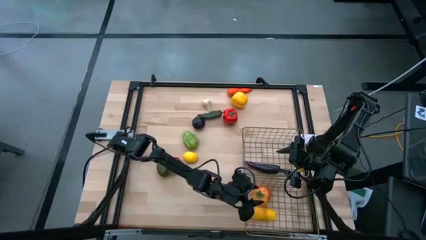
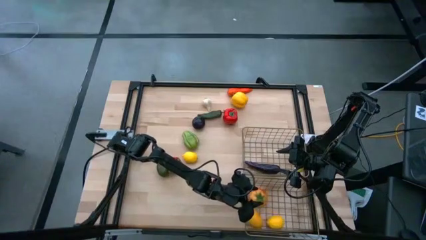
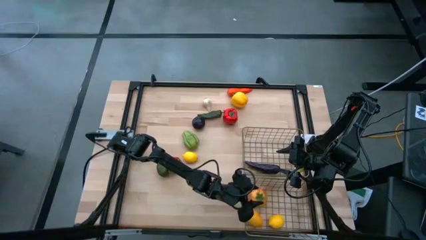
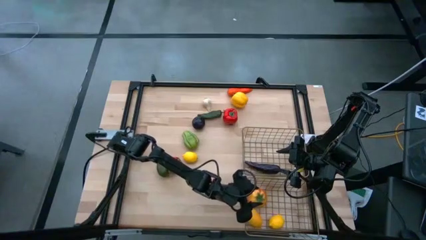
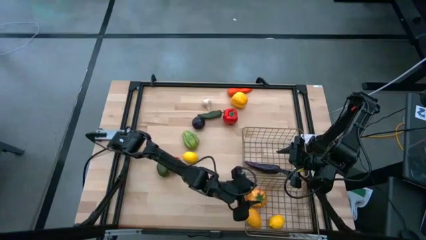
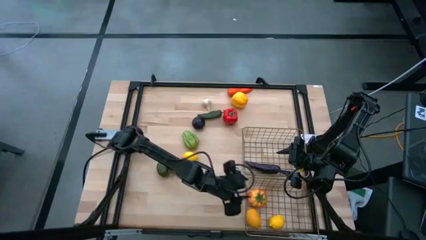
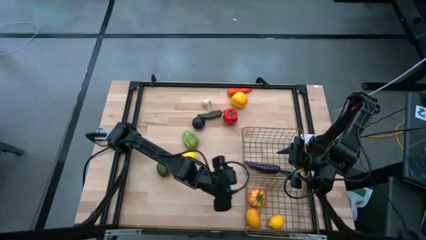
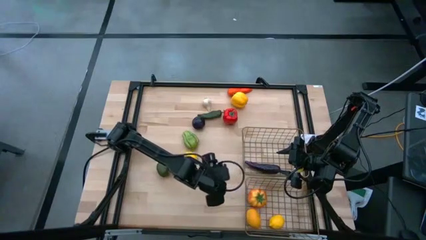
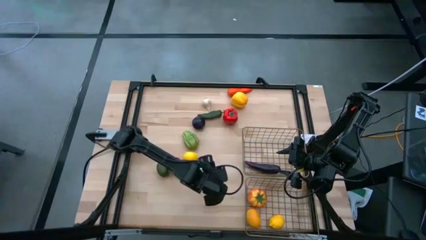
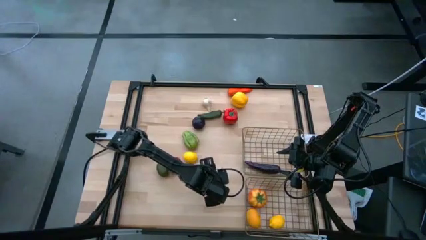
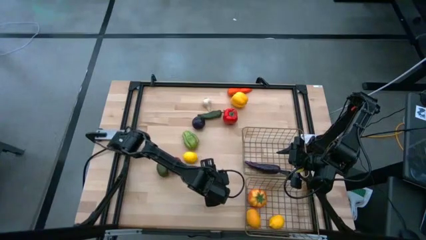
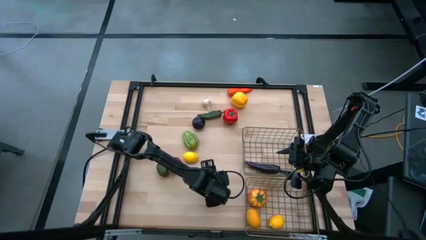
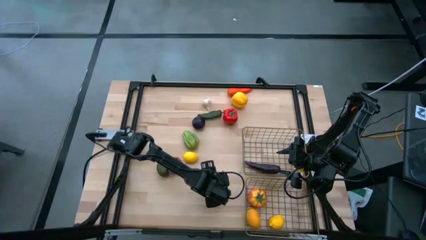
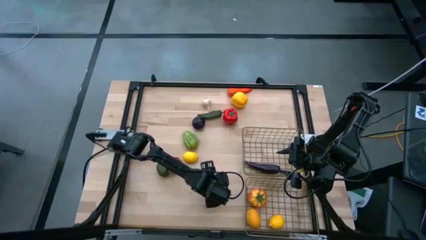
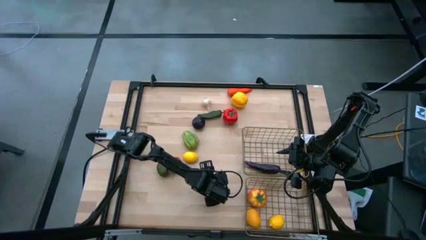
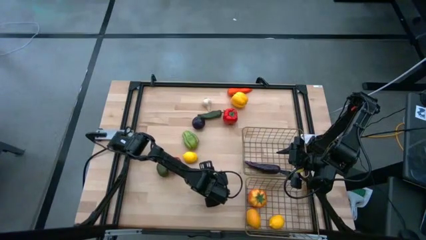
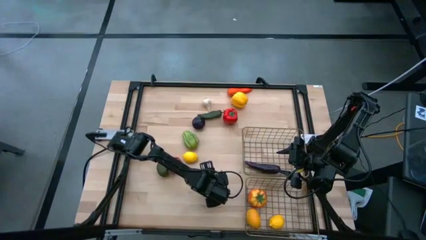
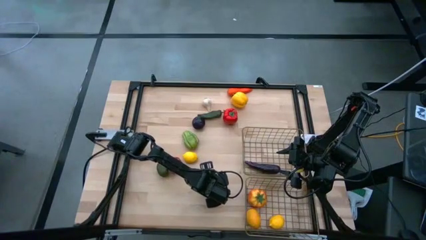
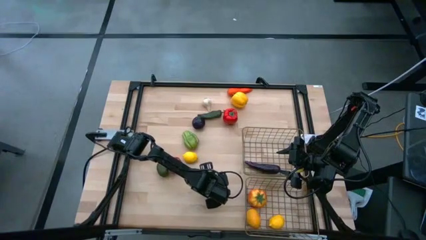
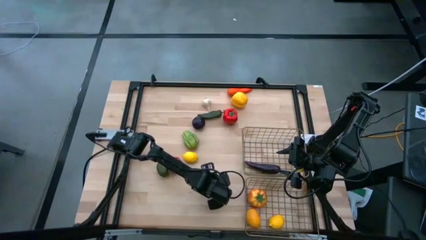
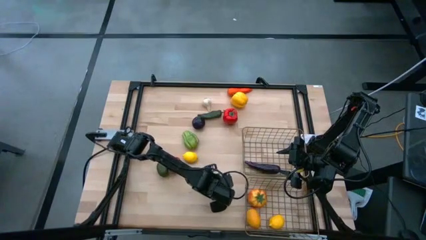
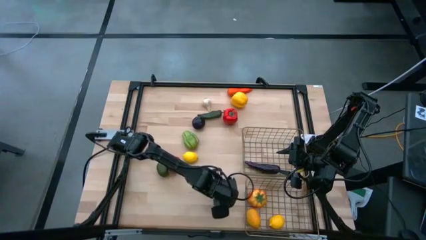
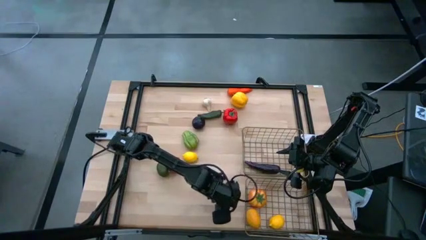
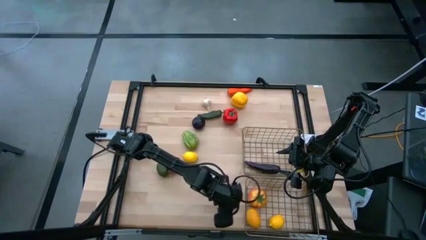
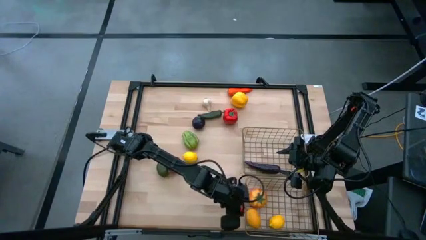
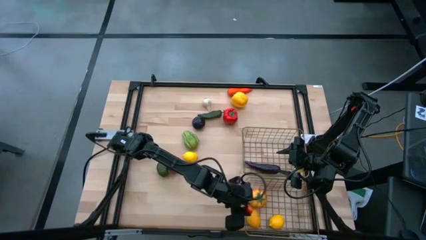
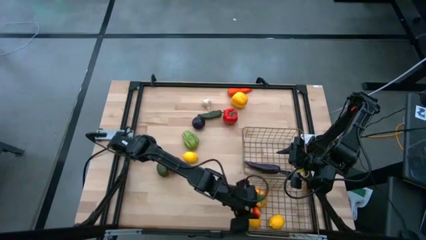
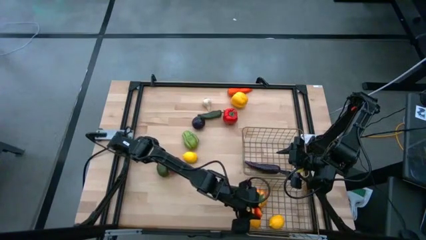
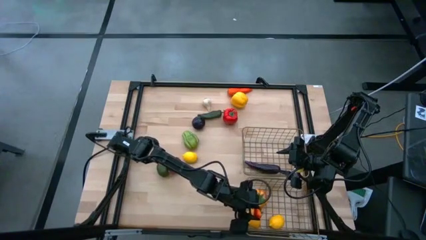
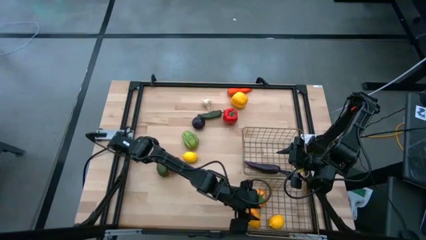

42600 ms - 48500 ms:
Task: Sort produce into baskets
Put the orange tomato into the bottom wire basket

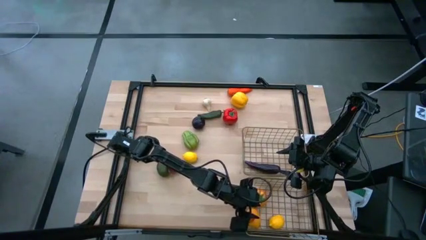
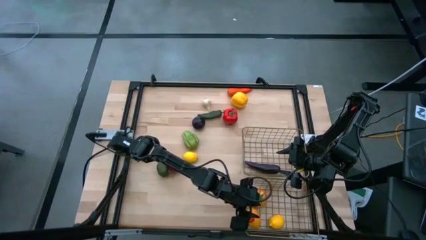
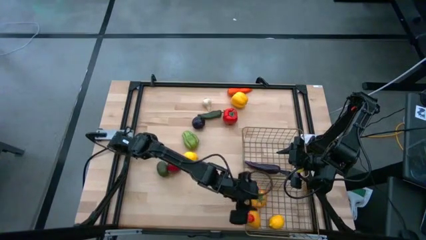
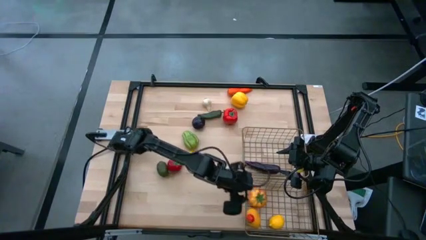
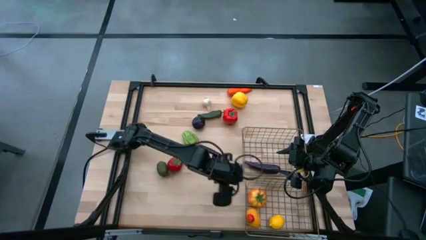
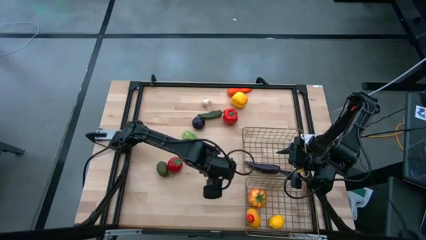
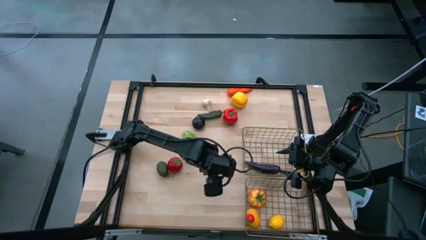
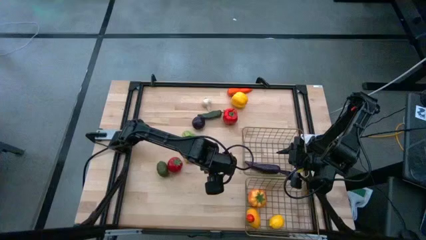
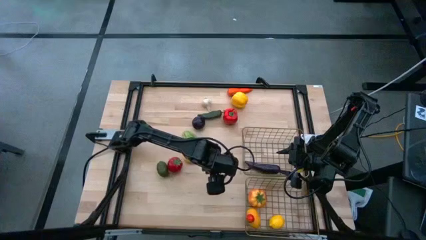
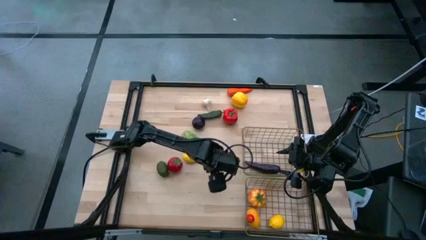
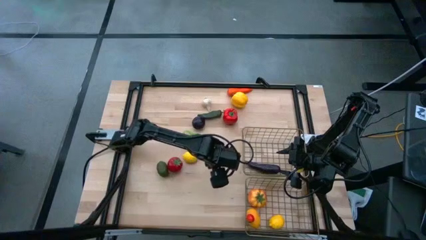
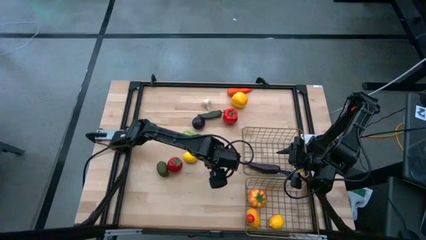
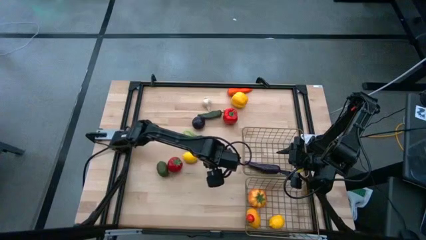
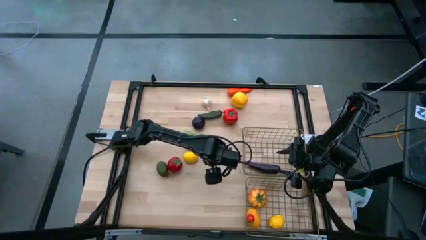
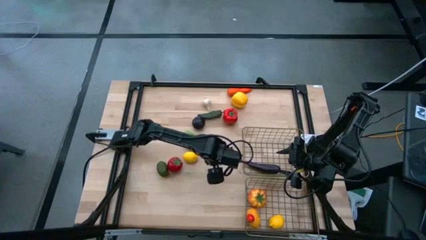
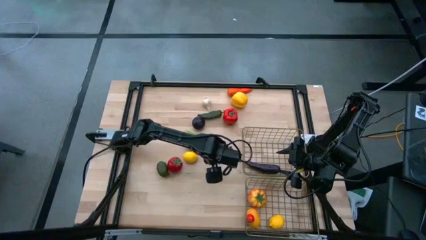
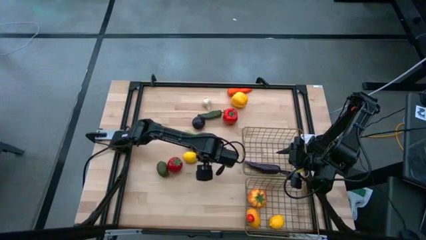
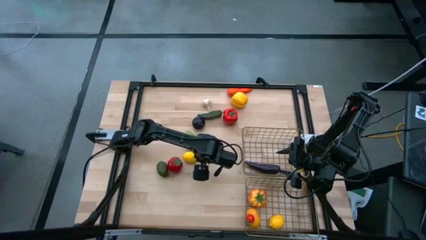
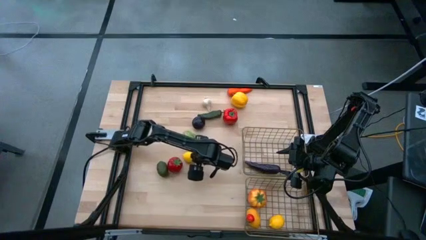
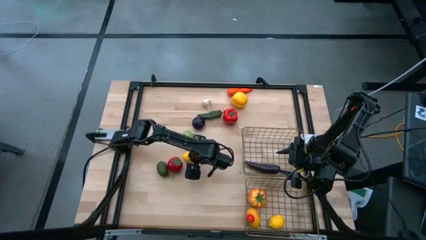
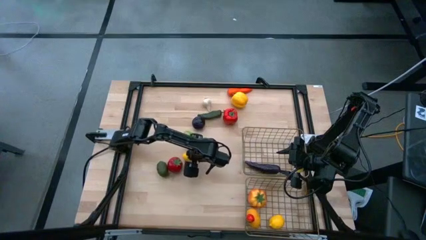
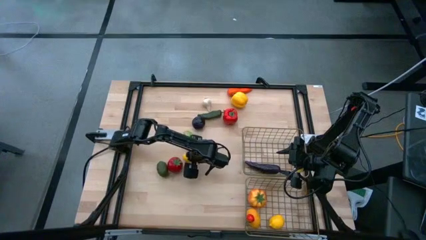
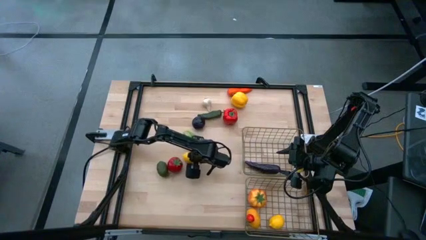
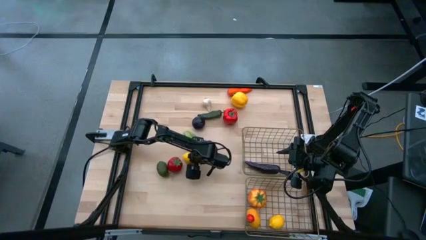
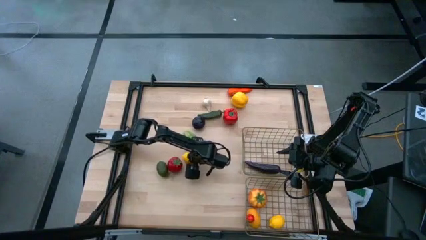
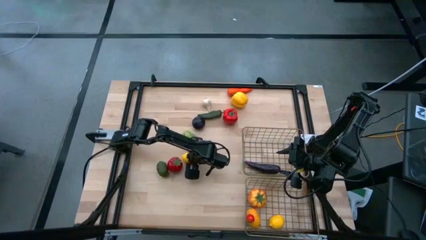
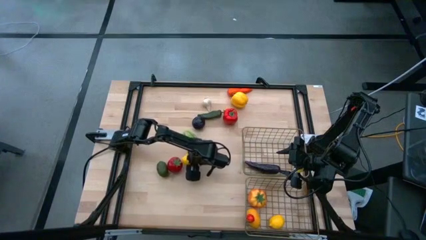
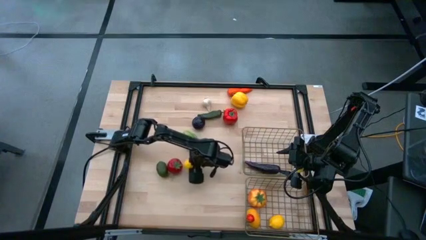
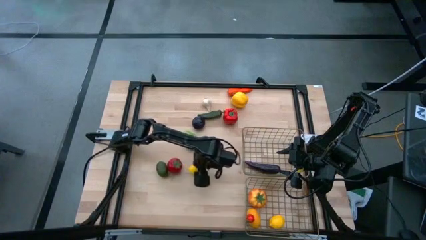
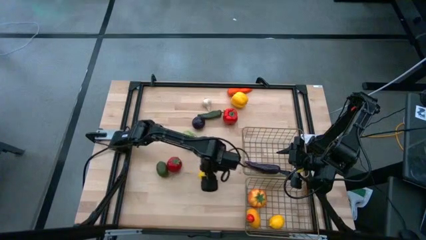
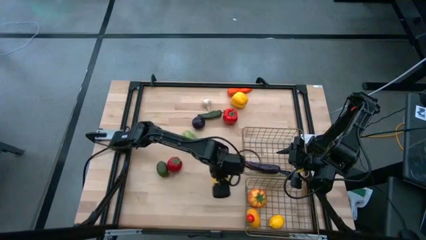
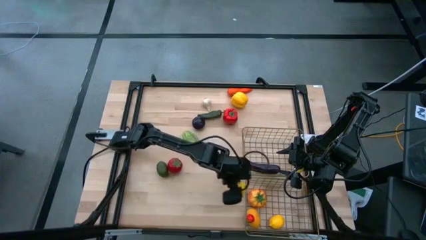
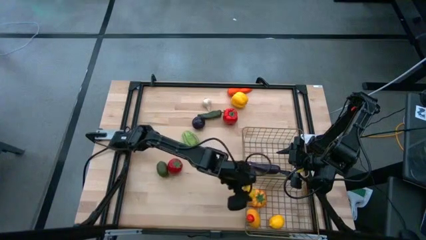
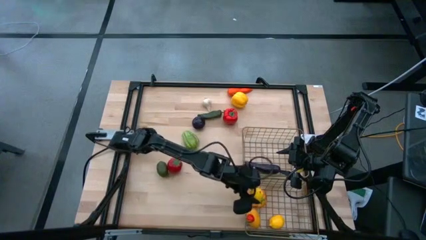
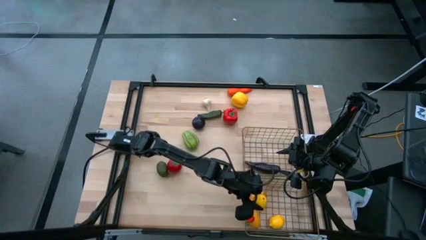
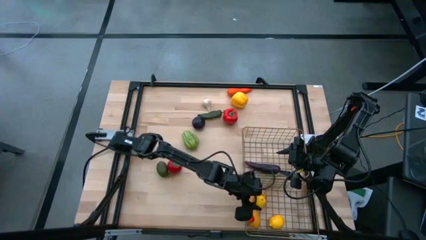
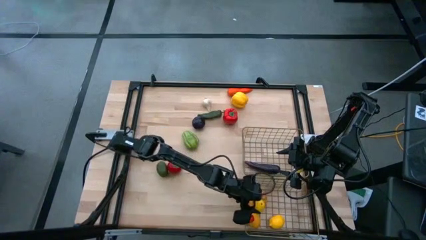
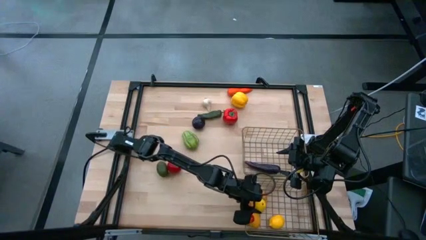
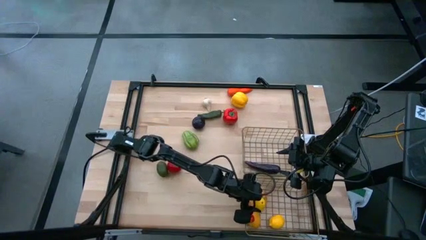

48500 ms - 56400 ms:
Put the lemon into the bottom wire basket

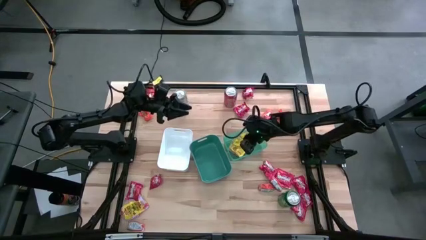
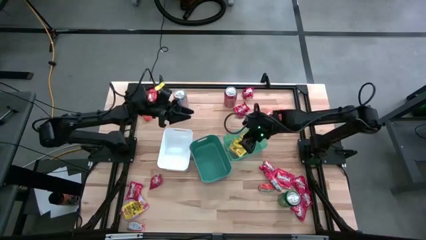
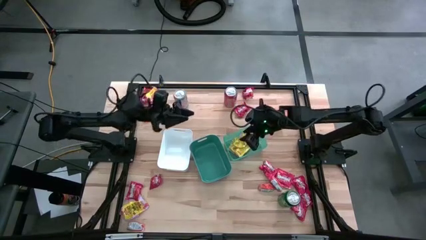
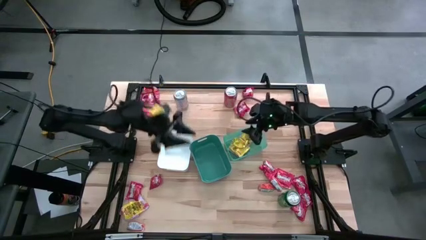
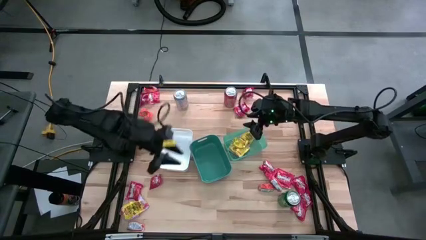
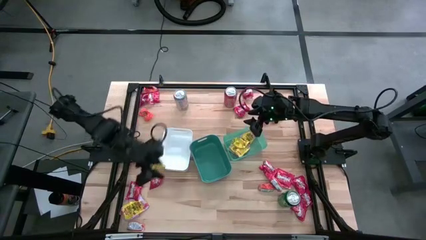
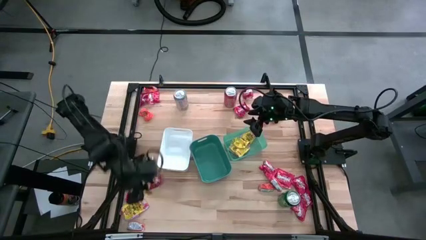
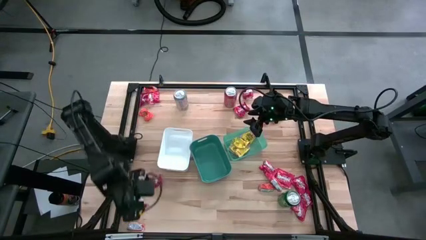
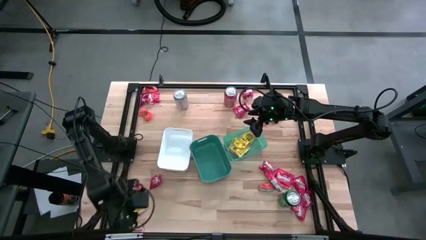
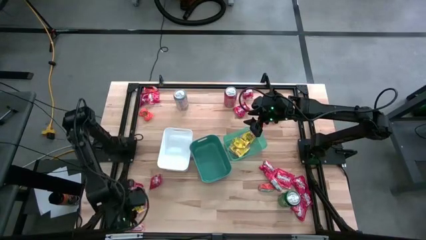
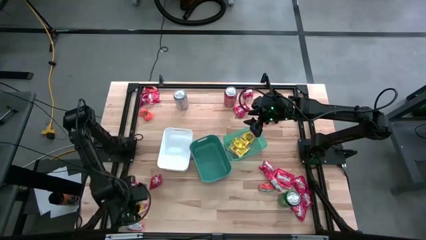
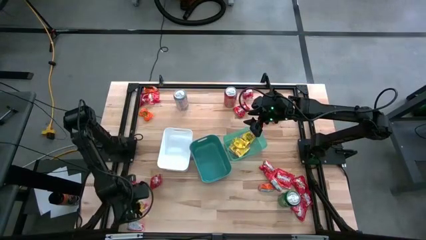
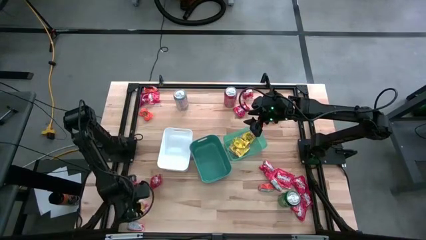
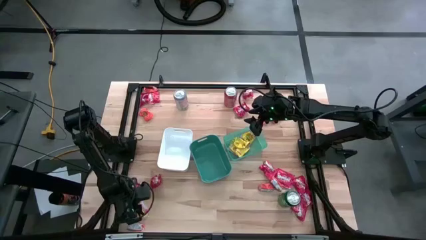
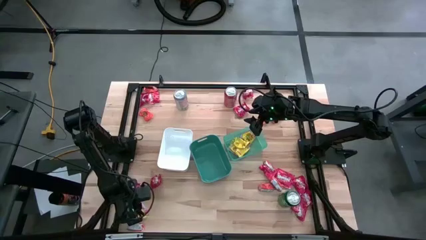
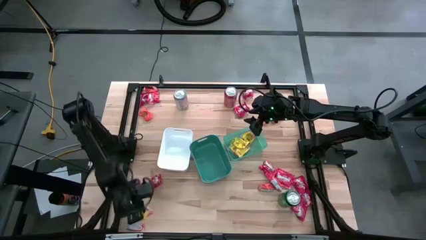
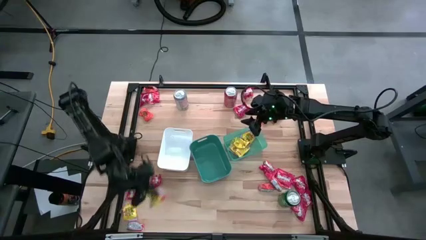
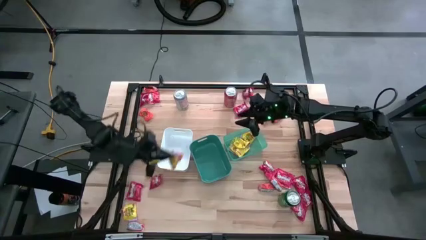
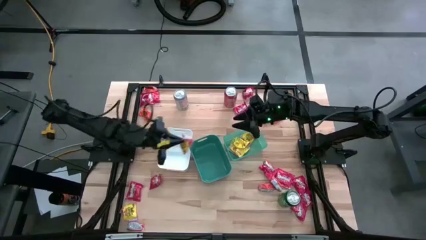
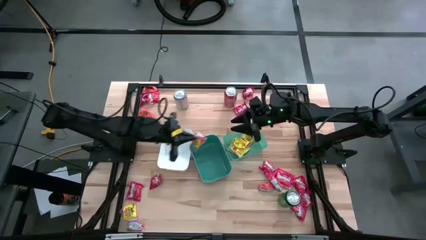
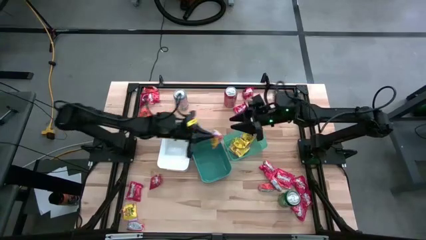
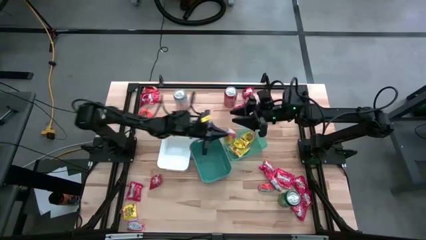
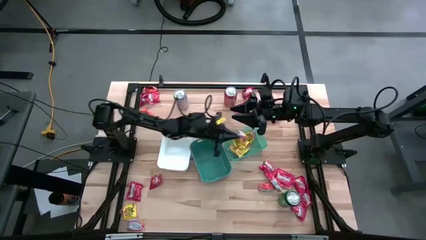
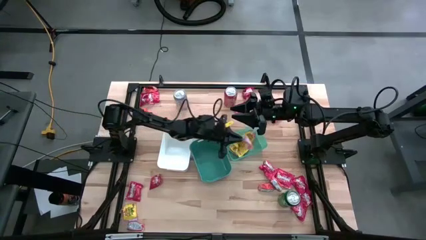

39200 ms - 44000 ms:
Task: Sort candy
Put the yellow candy into the green transparent bin
